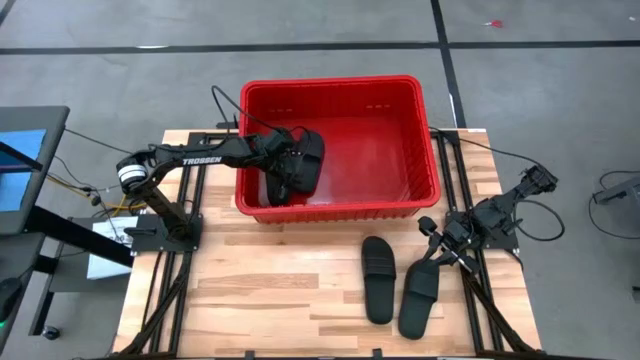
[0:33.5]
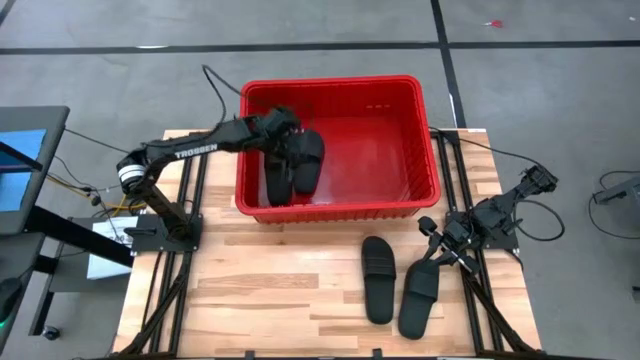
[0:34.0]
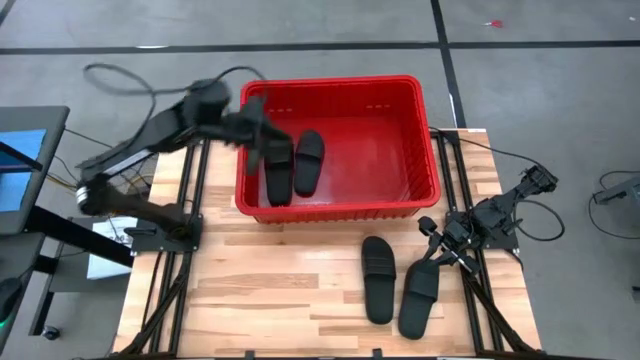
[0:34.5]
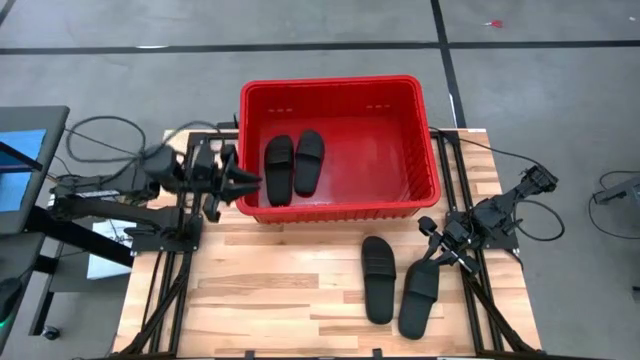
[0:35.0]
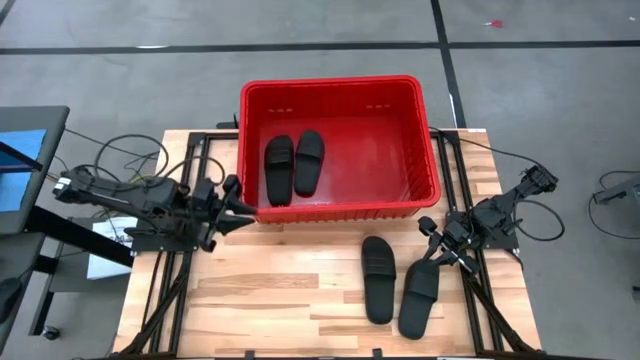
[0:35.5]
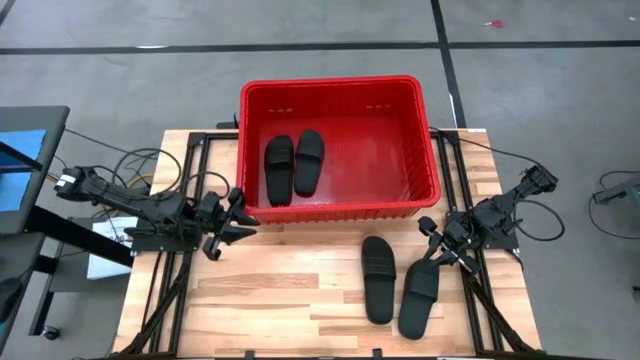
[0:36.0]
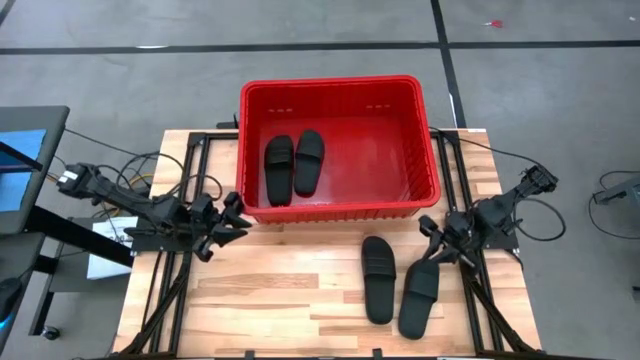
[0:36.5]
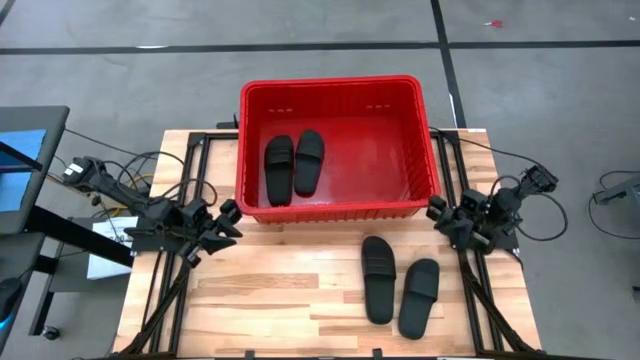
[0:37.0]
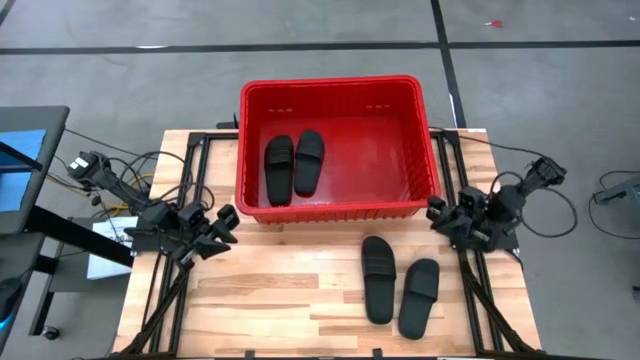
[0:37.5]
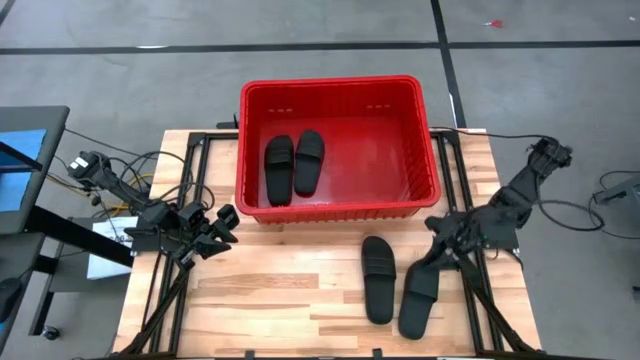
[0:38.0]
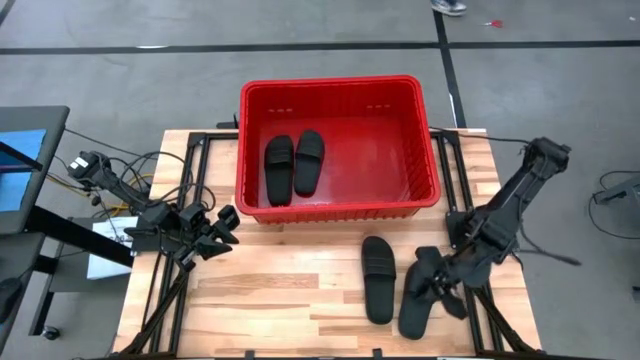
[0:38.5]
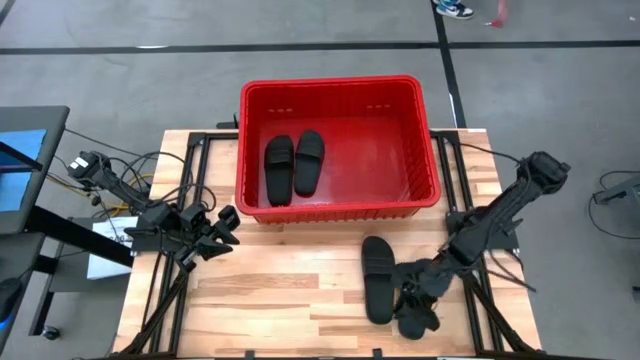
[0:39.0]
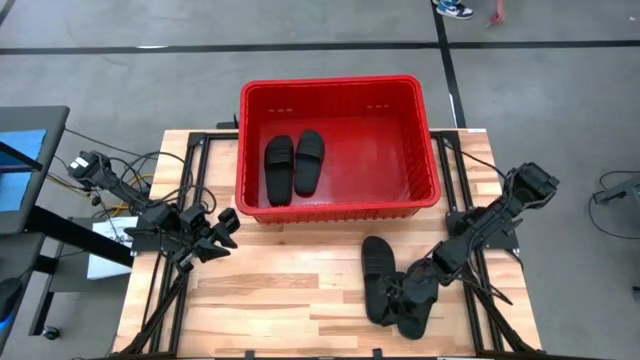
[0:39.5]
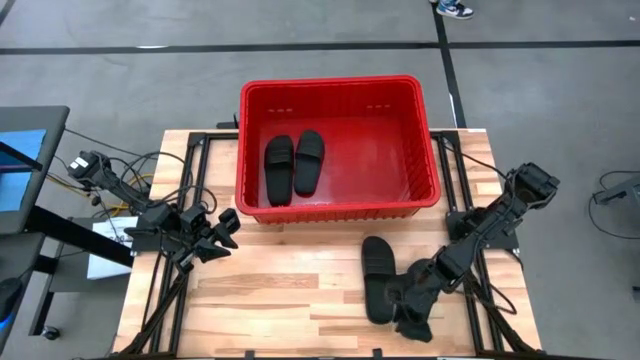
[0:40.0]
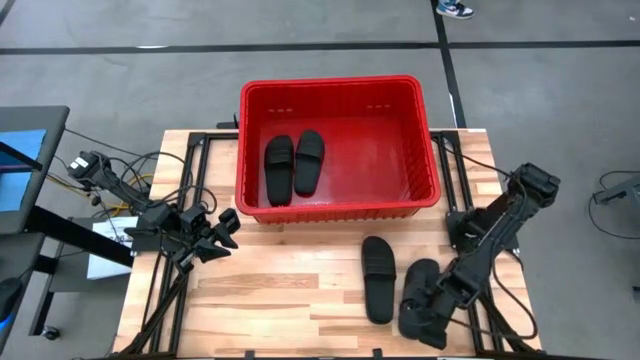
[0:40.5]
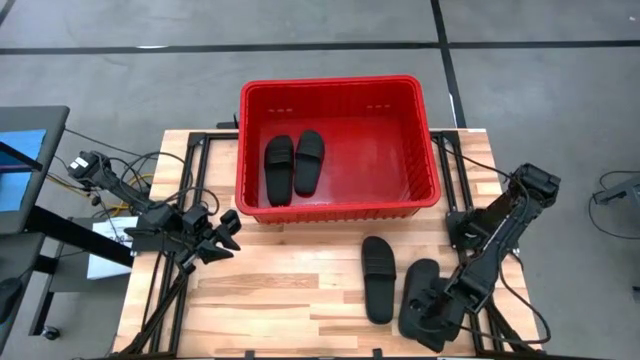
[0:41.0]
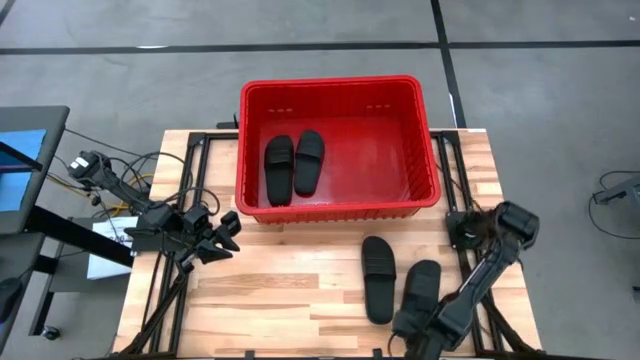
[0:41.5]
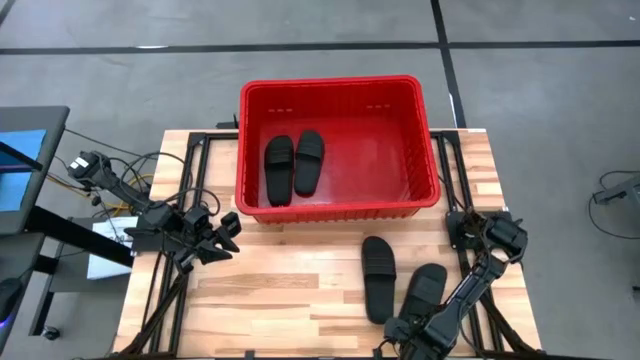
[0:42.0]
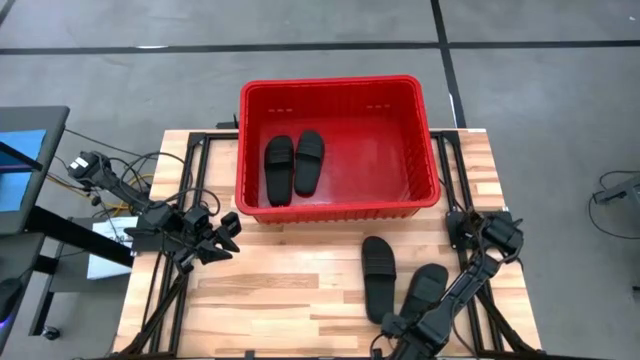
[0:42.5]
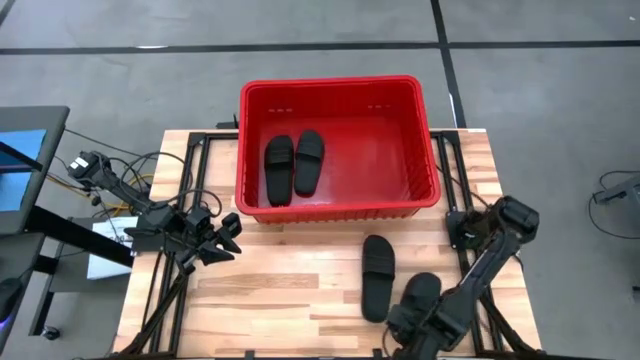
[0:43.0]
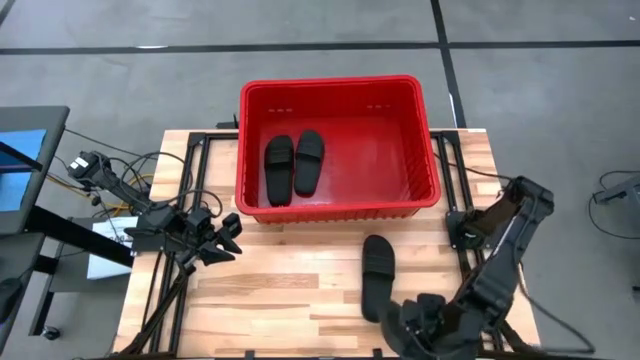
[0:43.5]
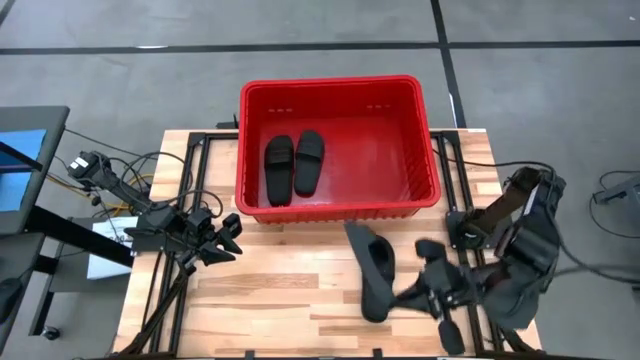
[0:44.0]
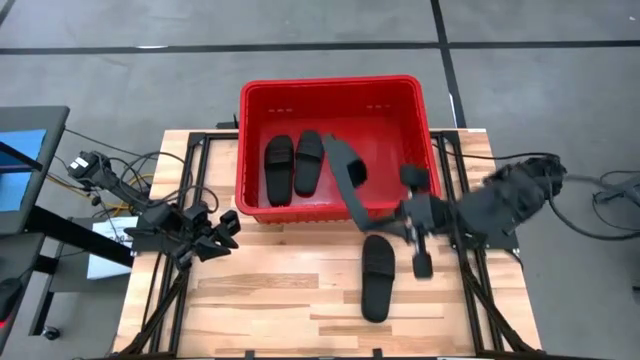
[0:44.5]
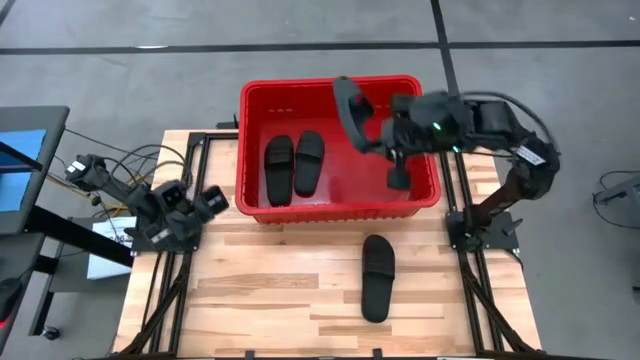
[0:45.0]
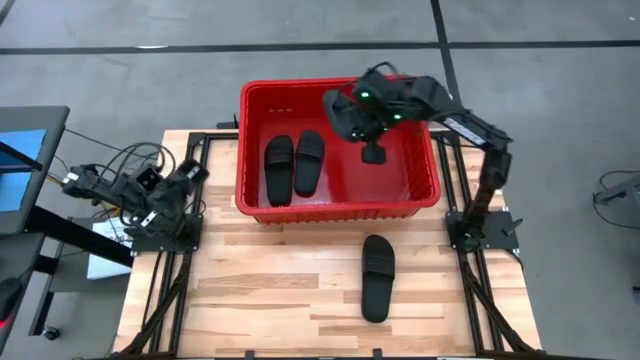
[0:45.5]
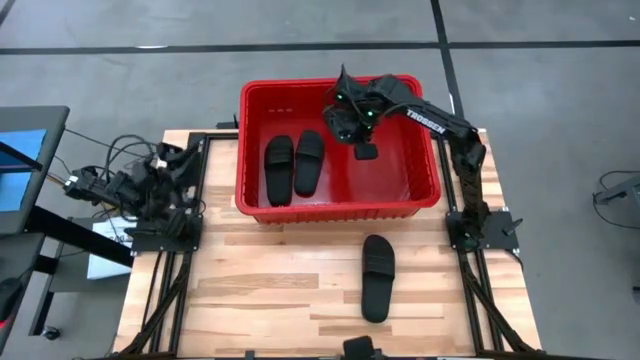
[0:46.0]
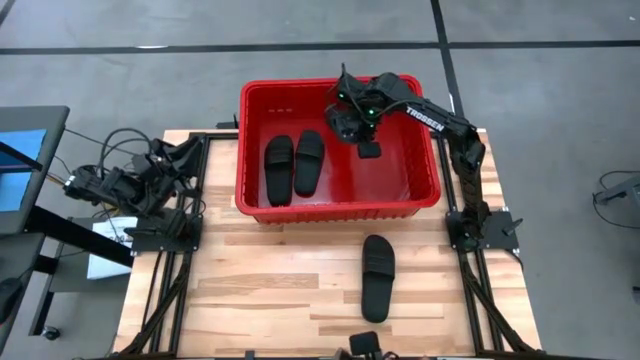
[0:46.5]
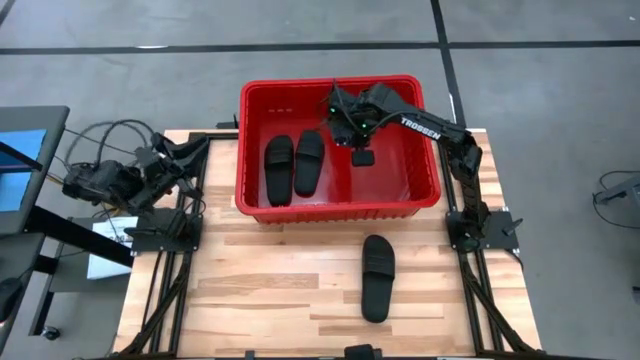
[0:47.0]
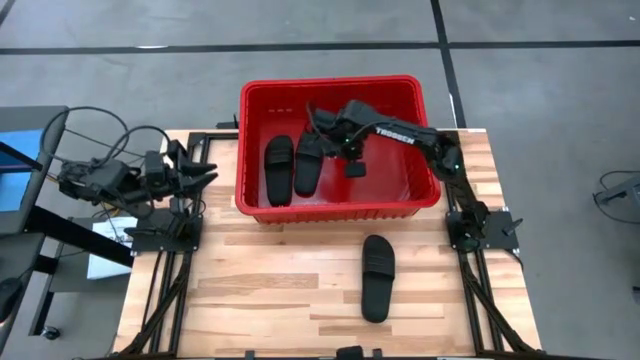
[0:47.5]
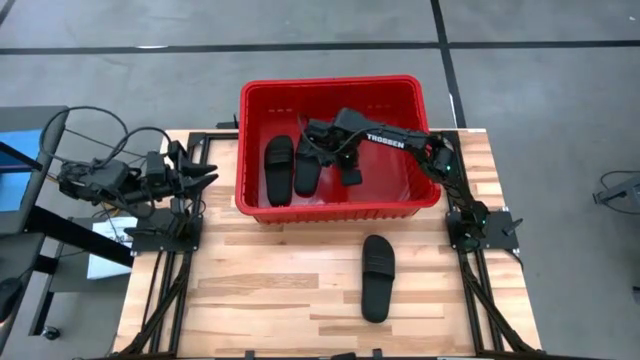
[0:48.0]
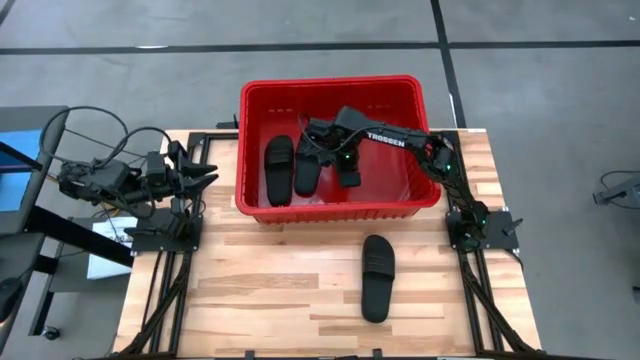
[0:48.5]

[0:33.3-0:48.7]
Task: Pick and place slides into bin
Put the black slide into the red container

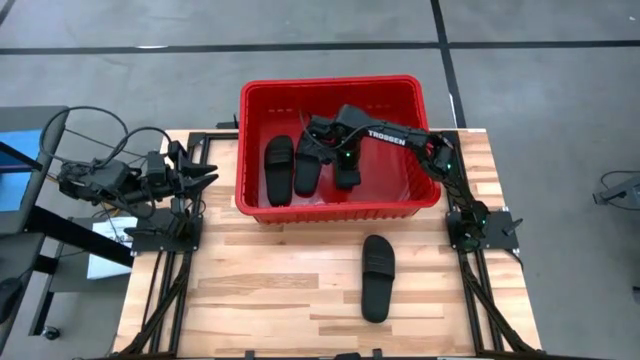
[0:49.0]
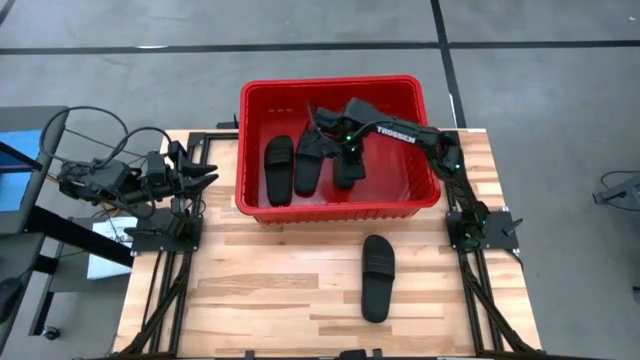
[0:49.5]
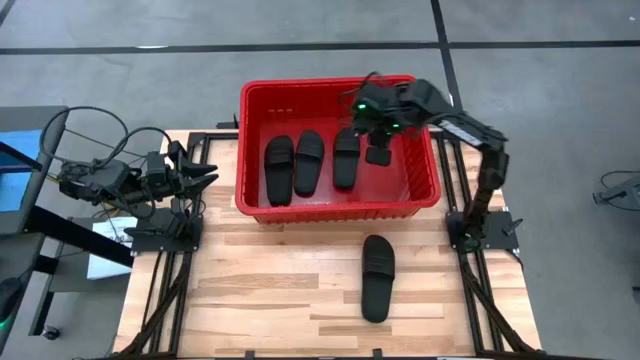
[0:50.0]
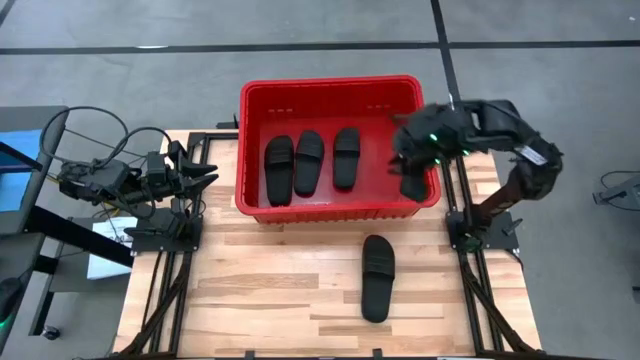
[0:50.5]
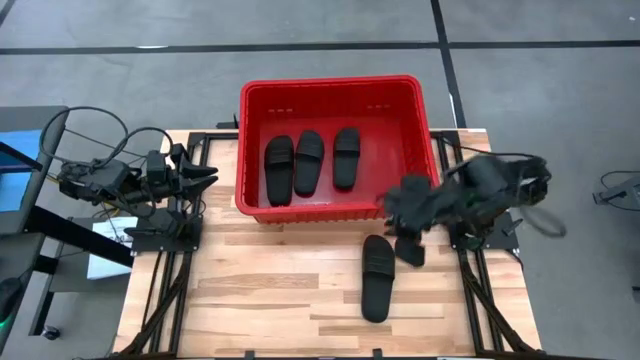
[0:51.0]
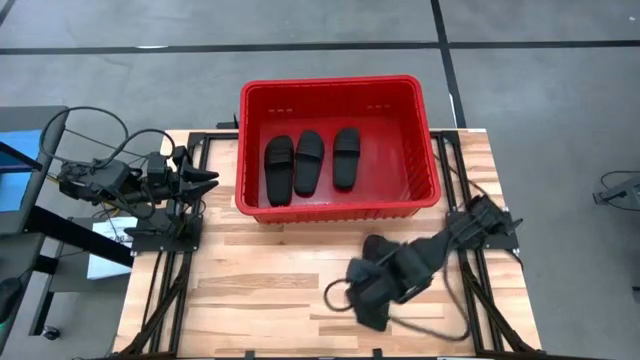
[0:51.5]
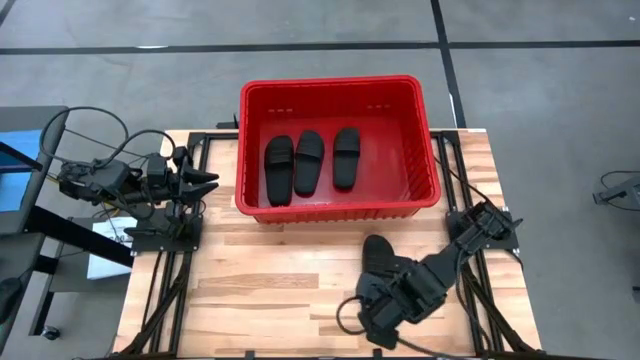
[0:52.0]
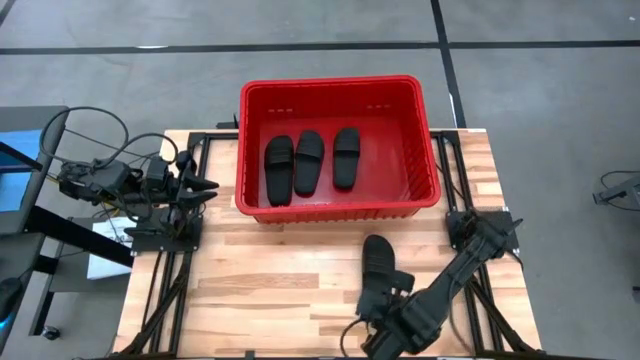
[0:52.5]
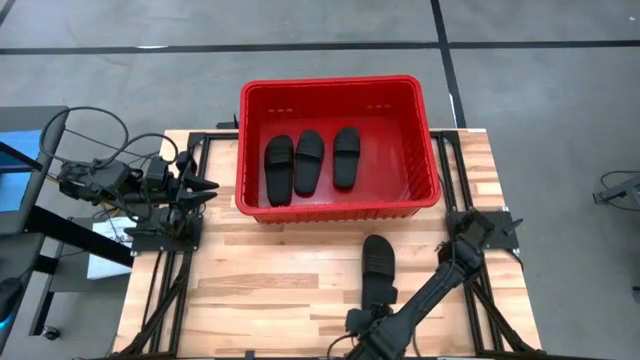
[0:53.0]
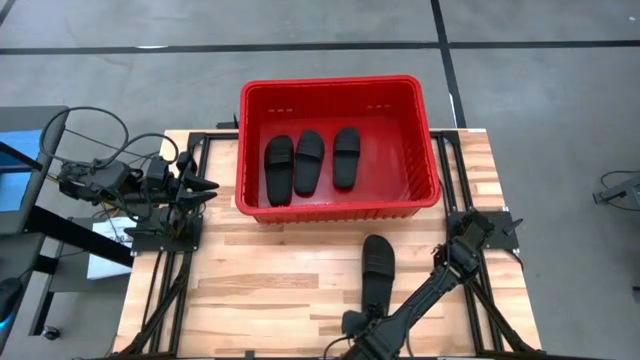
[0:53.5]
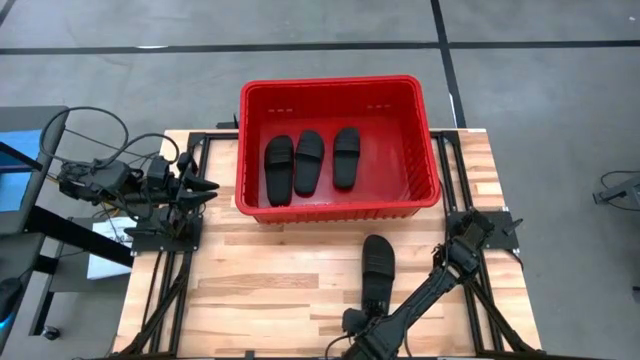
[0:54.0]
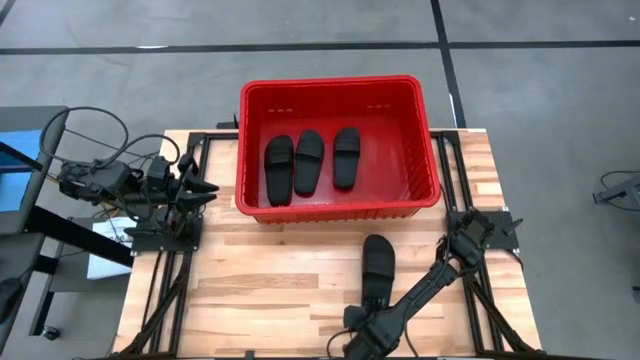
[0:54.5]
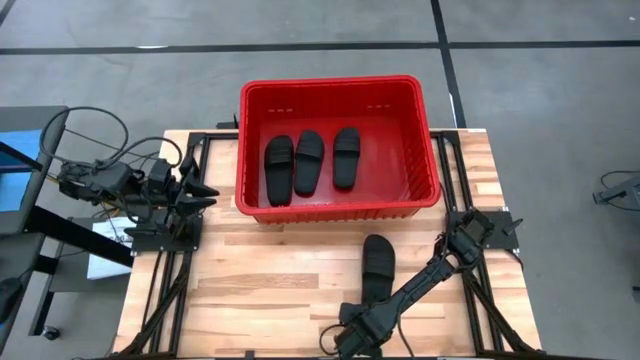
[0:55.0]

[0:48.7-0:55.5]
Put the black slide into the red container
